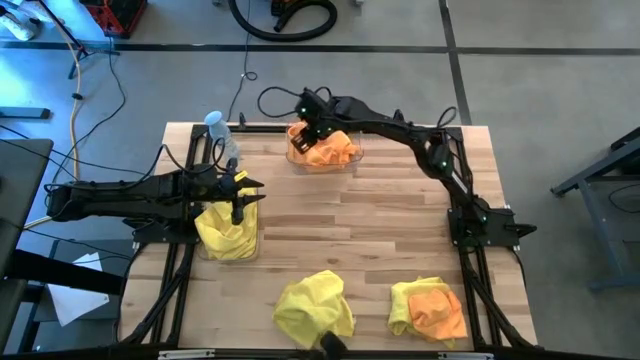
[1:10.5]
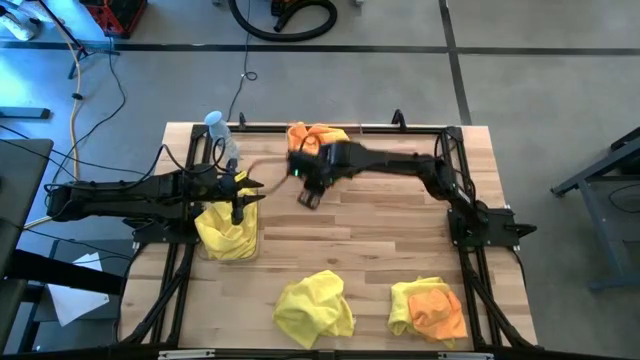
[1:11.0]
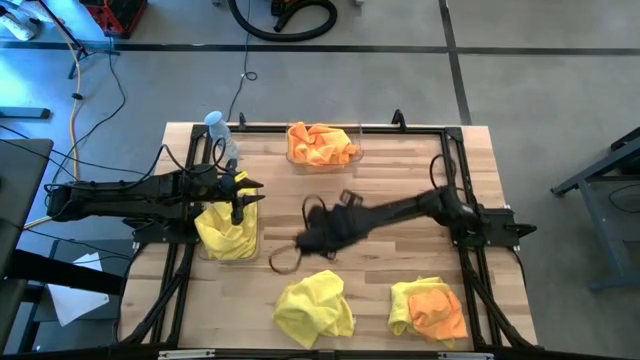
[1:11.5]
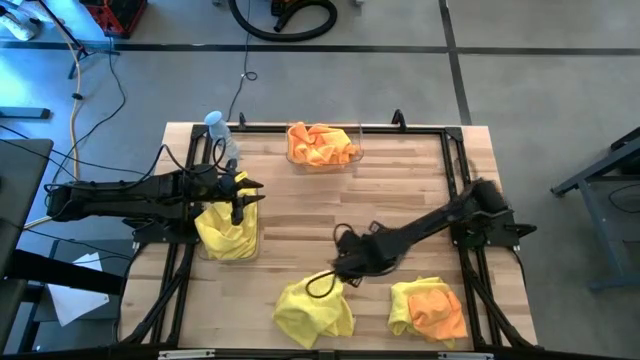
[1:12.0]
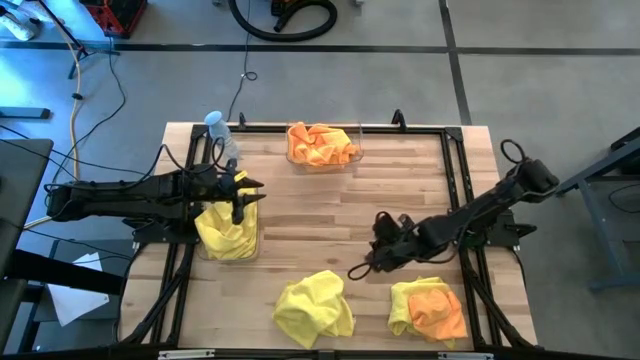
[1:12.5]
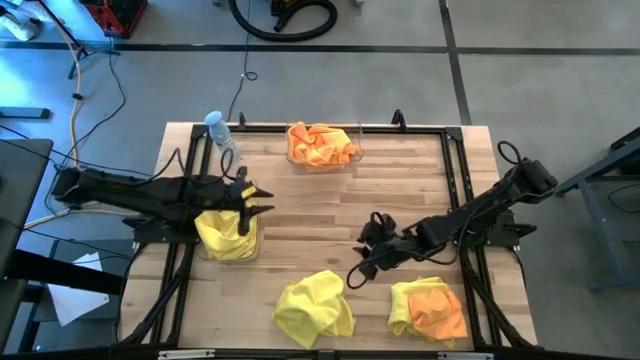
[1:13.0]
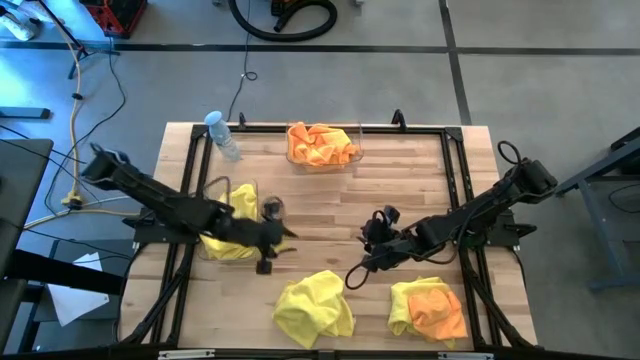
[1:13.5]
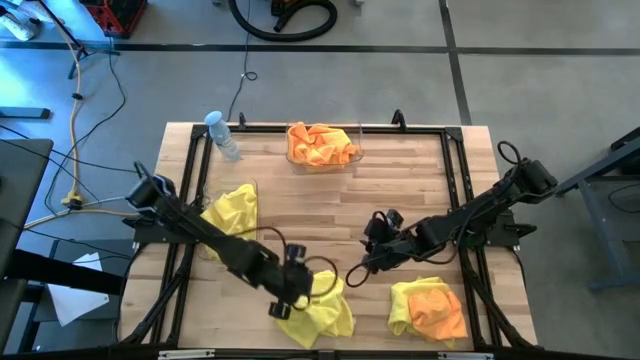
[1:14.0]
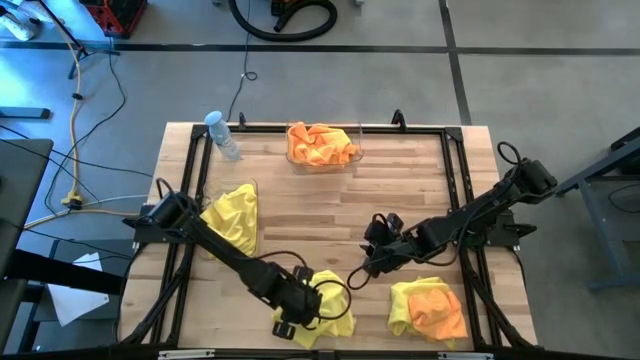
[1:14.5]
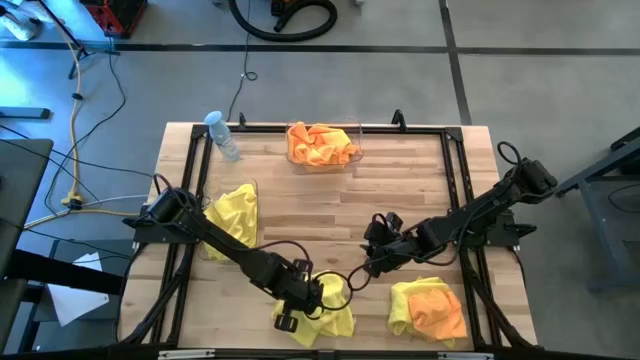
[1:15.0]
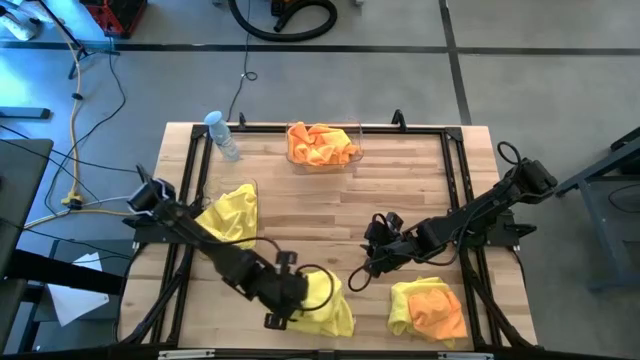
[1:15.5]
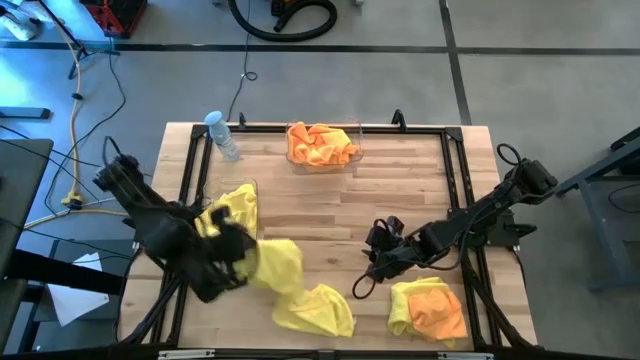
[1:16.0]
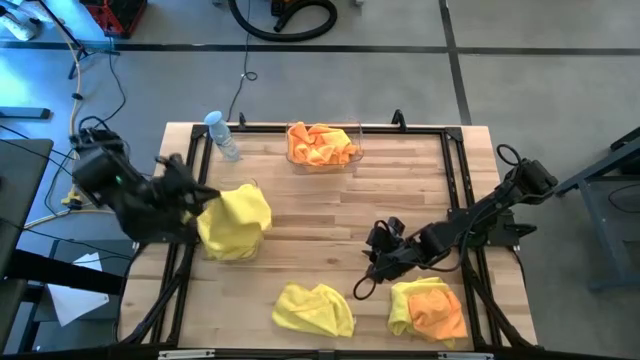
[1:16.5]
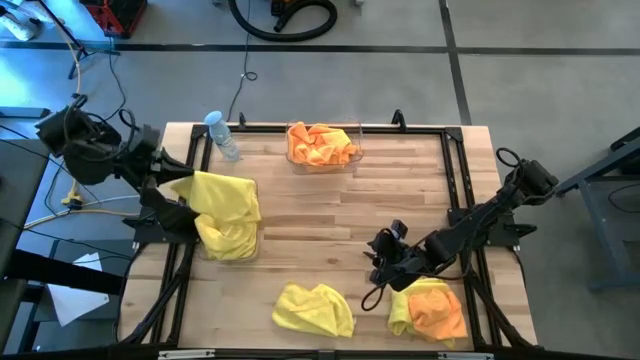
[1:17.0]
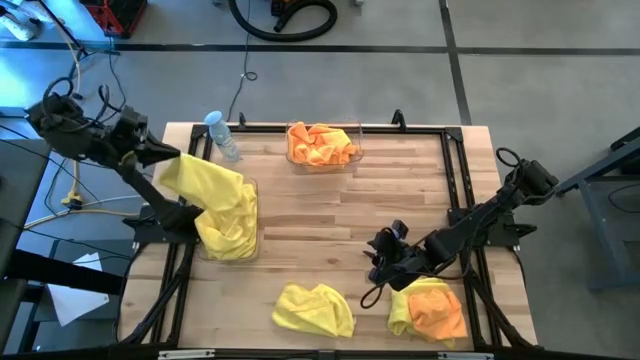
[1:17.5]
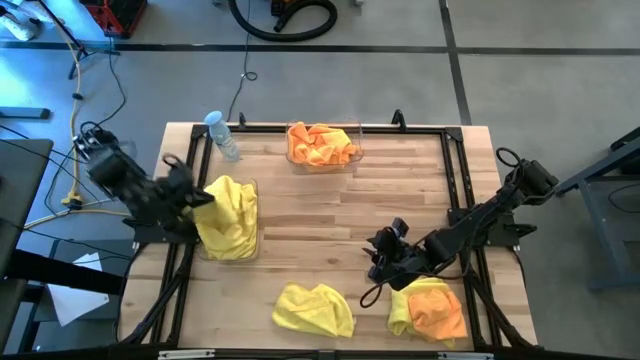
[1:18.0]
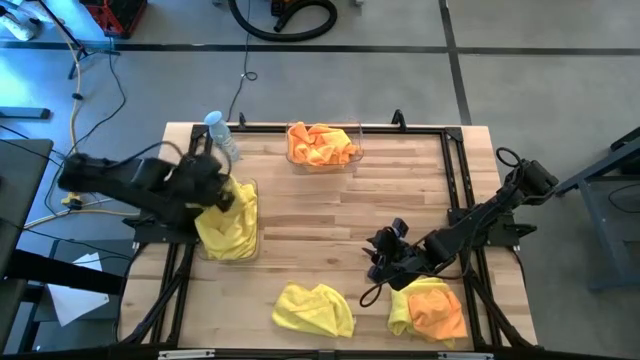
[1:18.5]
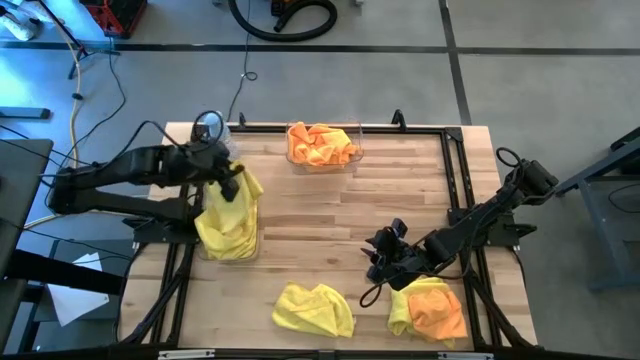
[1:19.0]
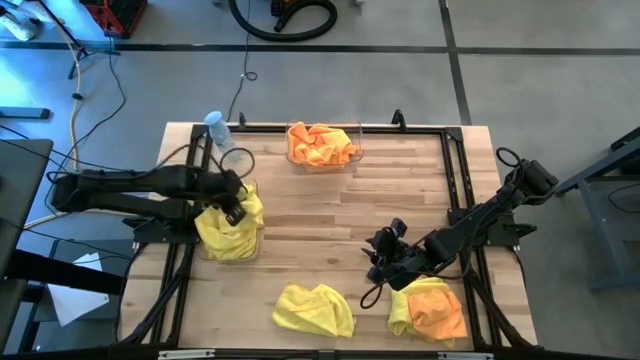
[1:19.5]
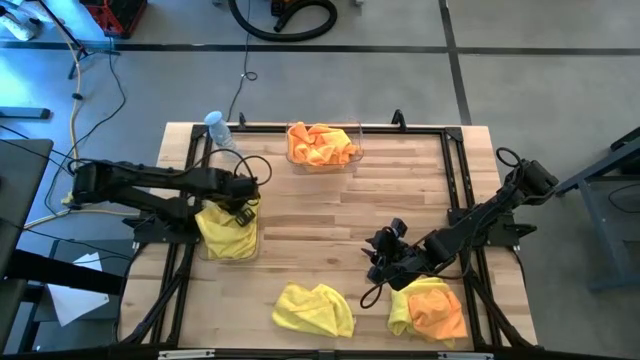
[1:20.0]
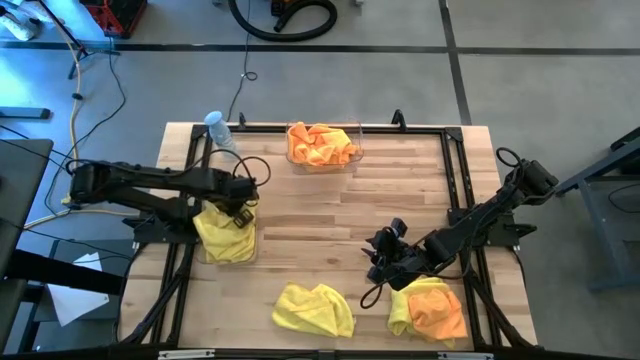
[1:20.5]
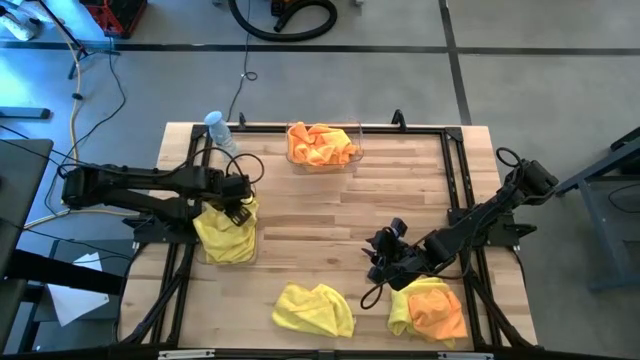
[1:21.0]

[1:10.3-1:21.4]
Task: Sort microfiber towel by color & place in baskets
Put the yellow microfiber towel into the bottom transparent bin

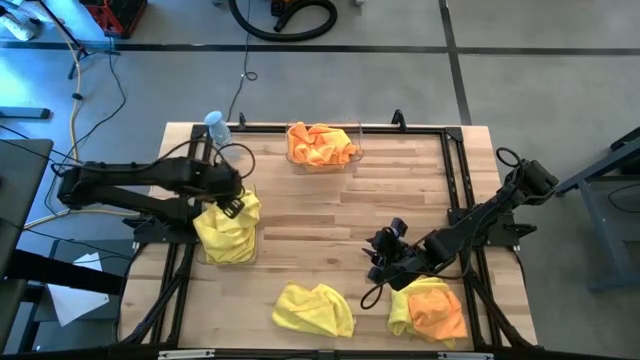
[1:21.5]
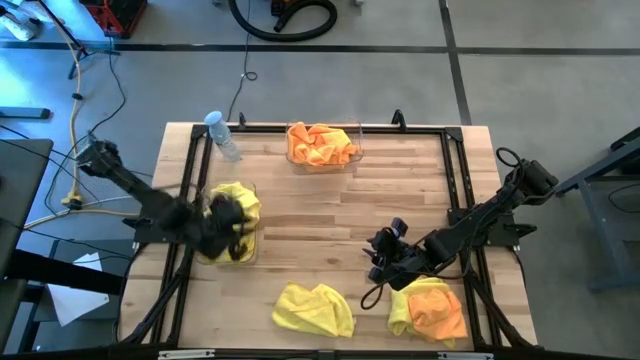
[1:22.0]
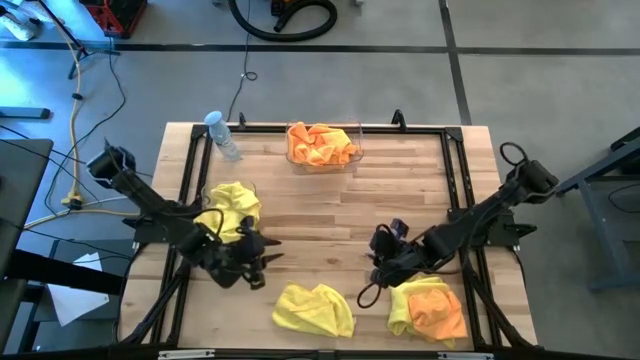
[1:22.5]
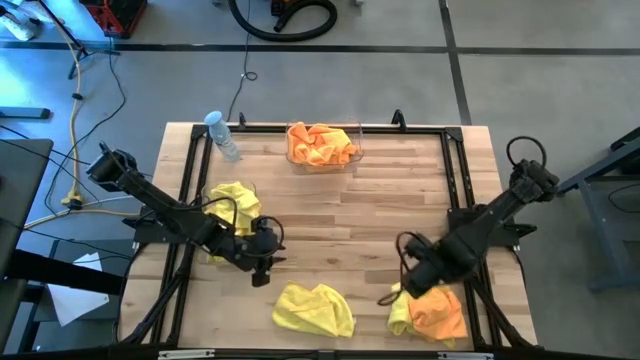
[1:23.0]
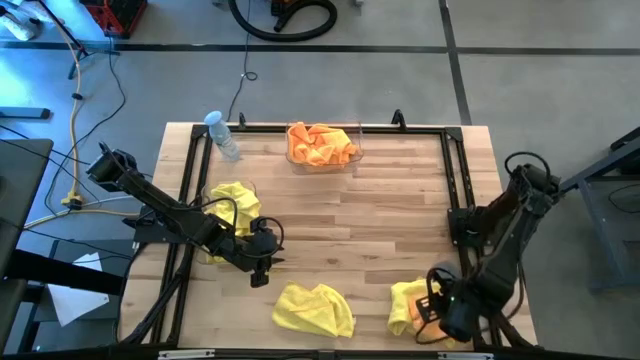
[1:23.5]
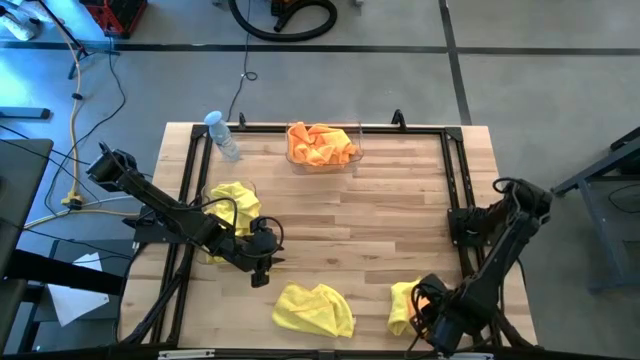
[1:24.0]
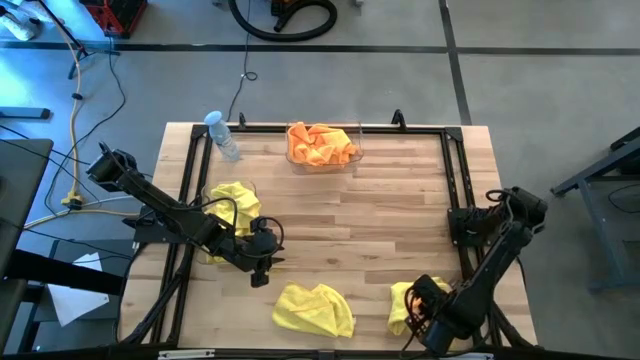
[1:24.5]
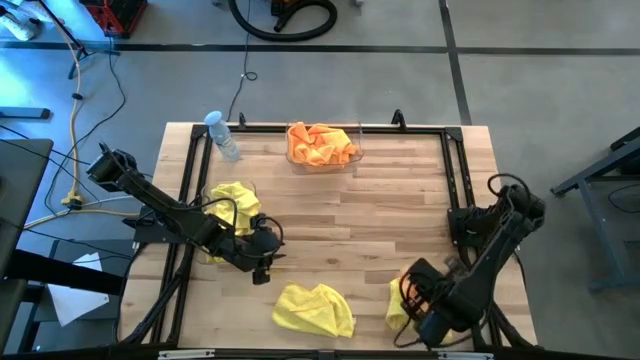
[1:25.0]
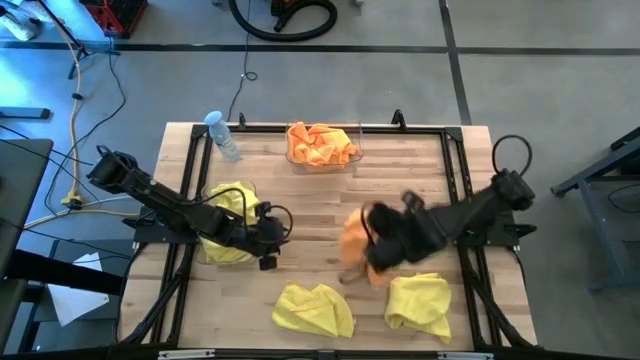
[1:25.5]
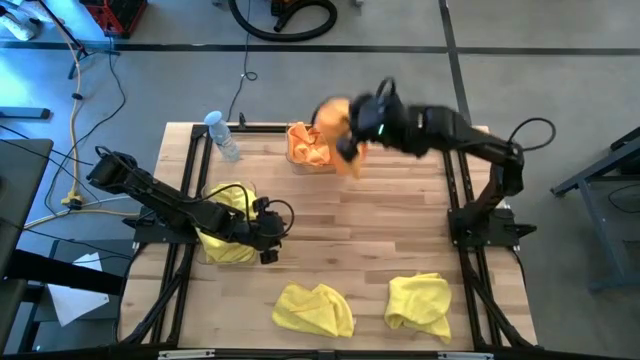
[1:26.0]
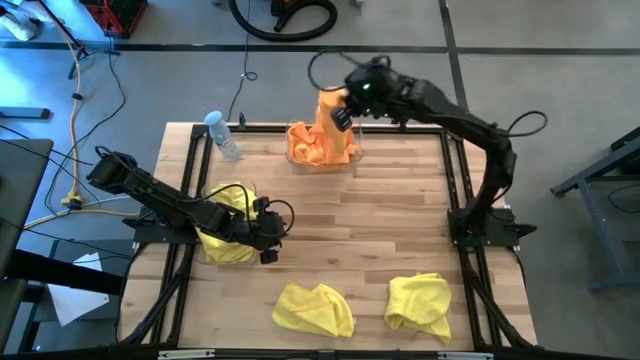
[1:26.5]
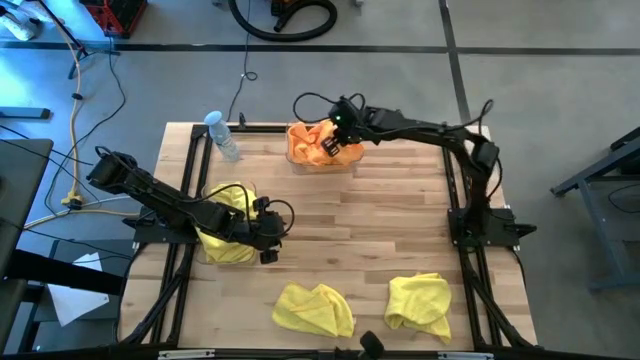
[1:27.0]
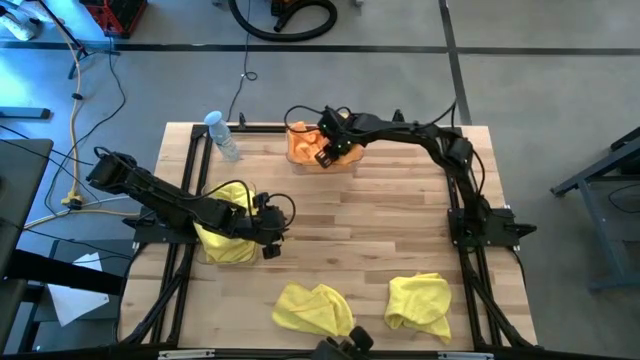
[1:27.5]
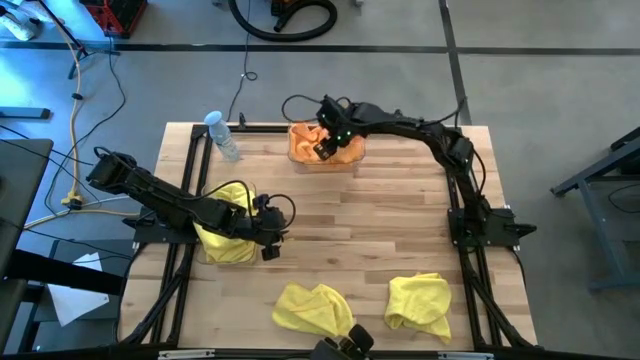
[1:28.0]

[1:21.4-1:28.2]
Put the orange microfiber towel into the top transparent bin

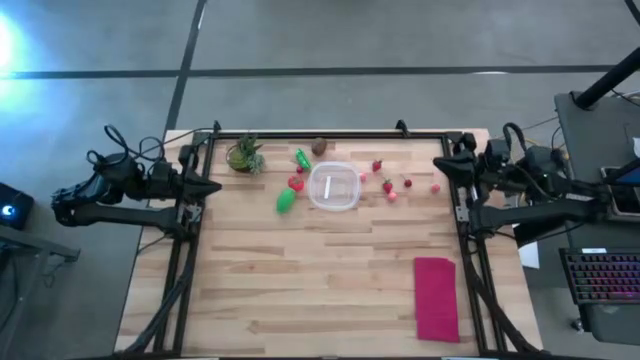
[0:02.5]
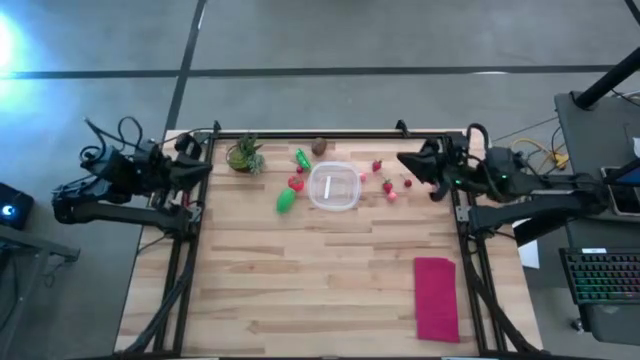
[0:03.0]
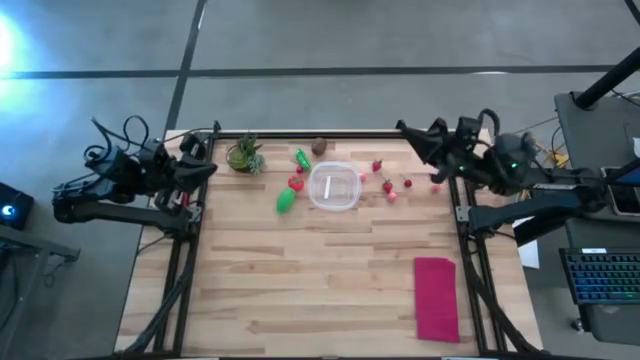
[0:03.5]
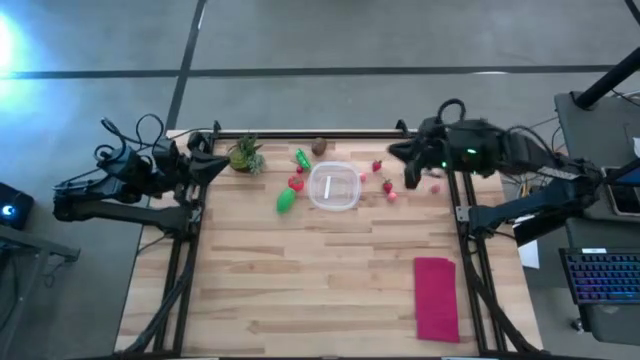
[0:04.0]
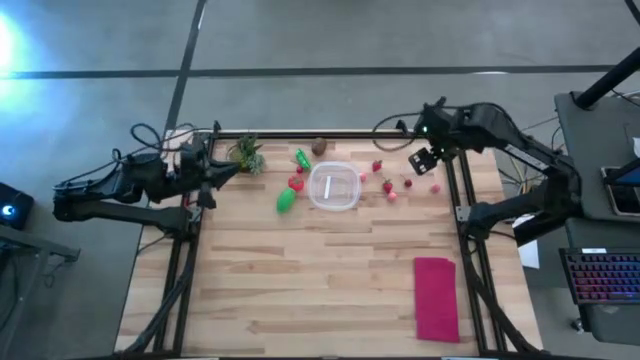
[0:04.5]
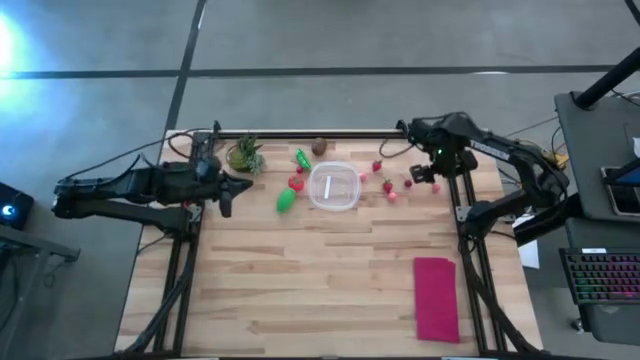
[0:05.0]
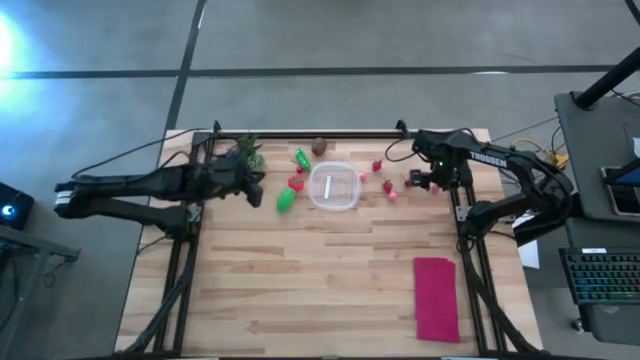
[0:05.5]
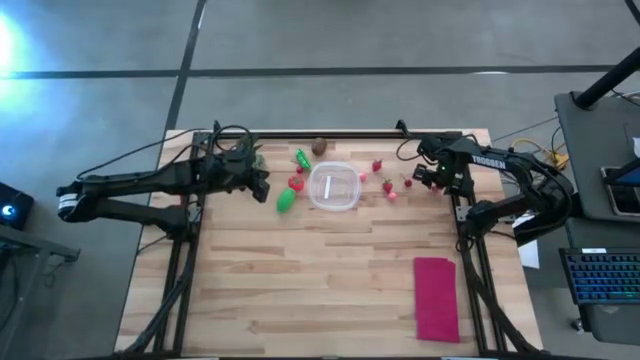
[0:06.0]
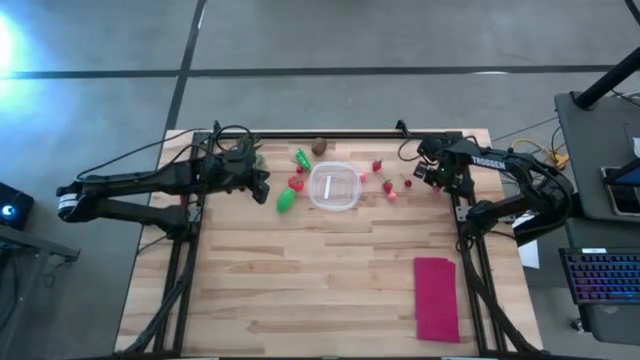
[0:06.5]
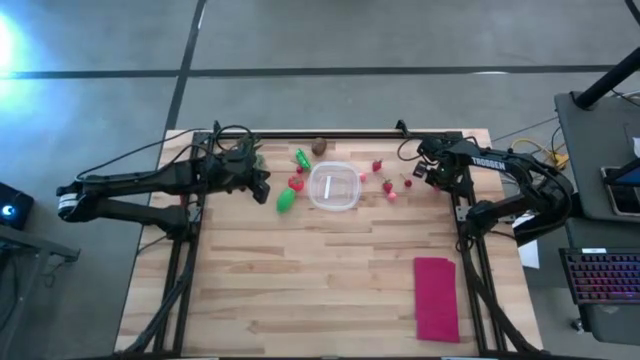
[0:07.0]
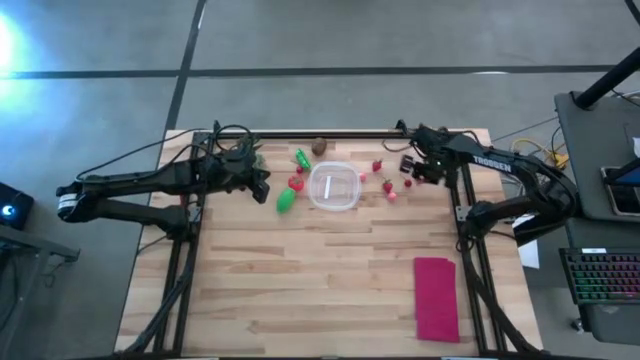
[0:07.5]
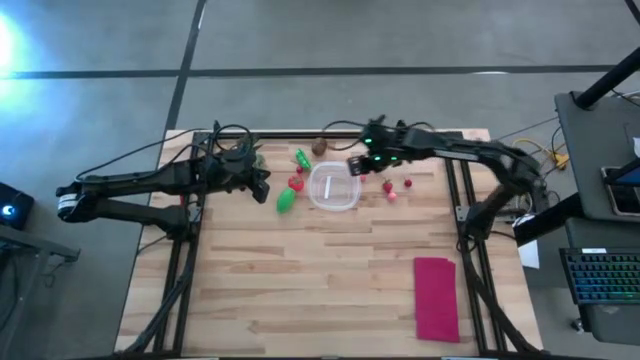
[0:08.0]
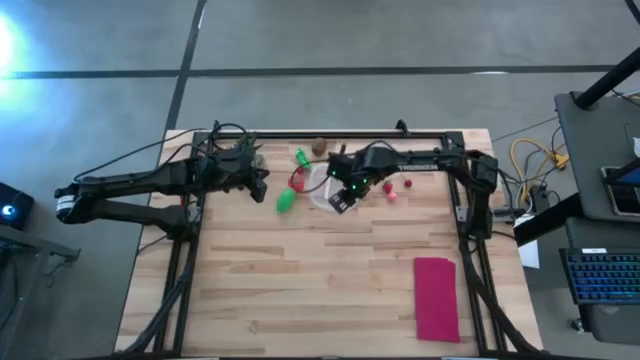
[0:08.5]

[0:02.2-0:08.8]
Task: Pick and placing Produce into tupperware
Put the right peach into the transparent bin
